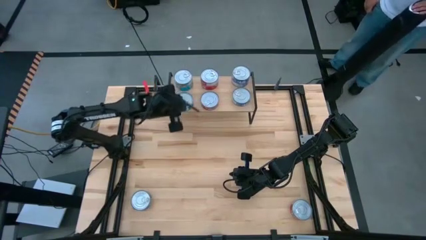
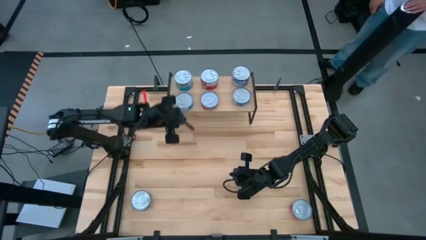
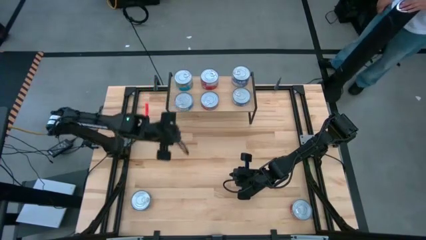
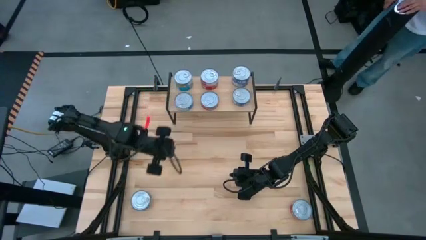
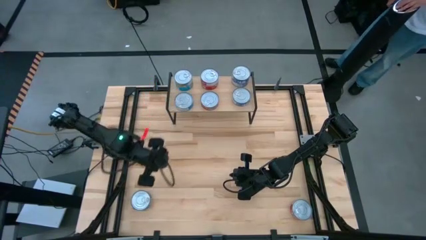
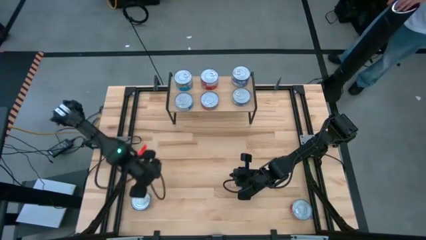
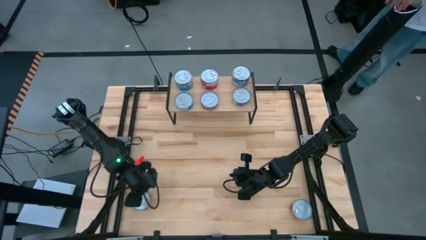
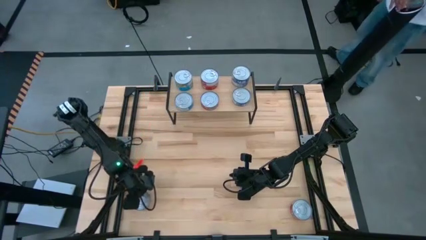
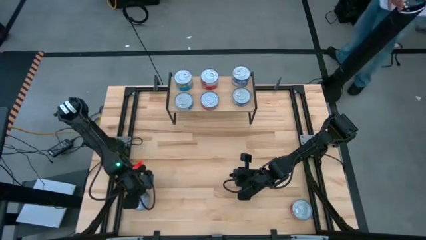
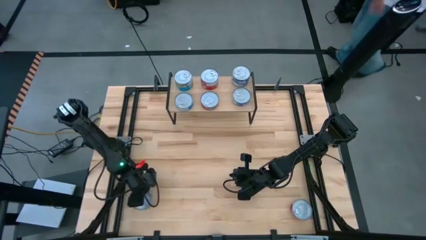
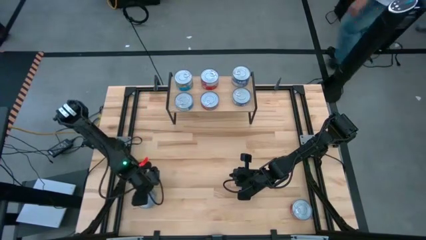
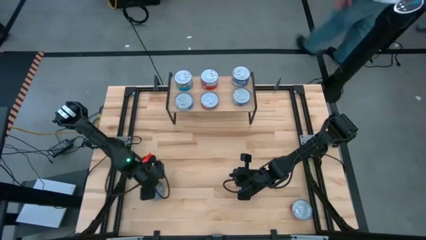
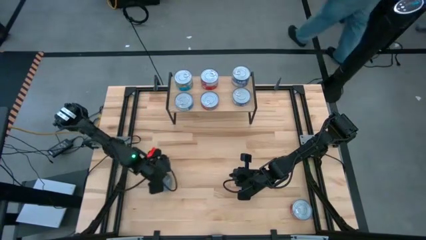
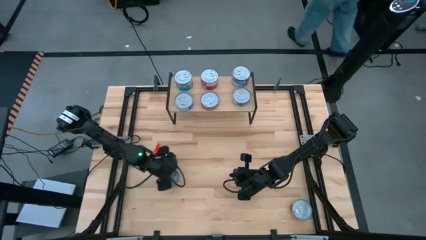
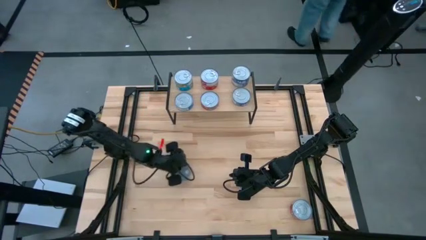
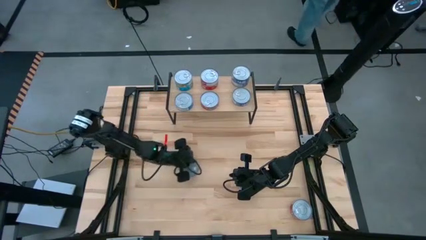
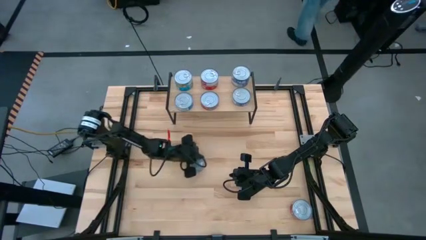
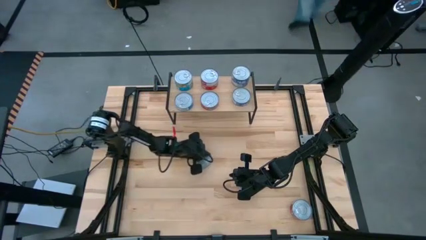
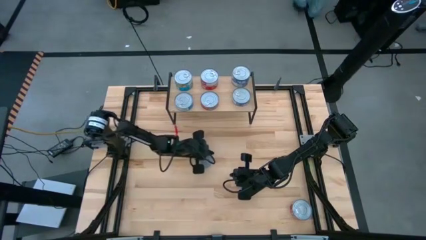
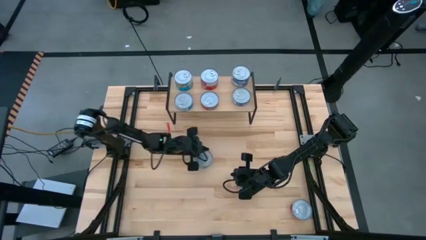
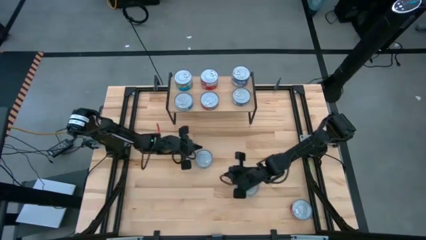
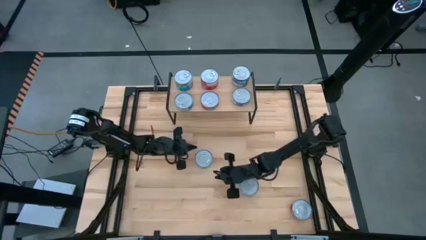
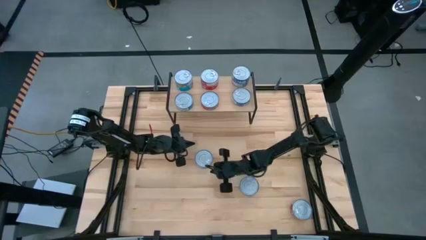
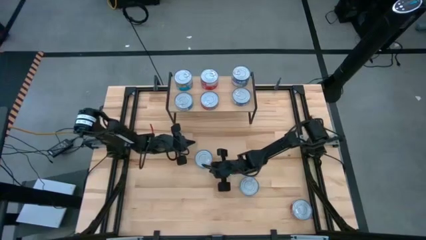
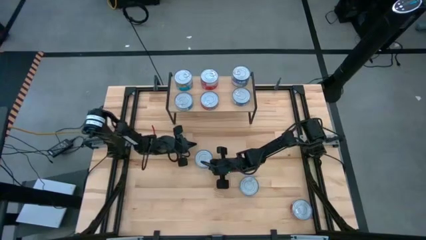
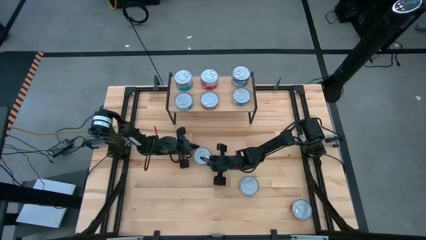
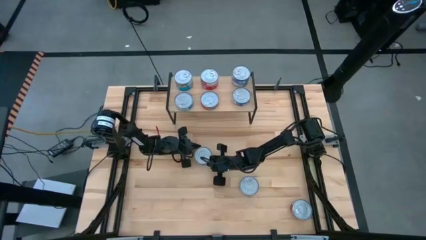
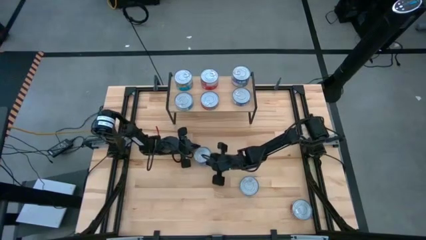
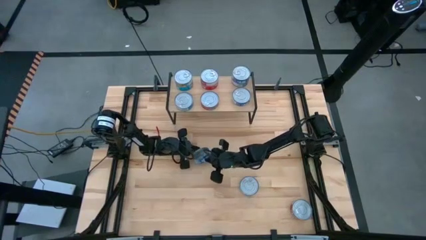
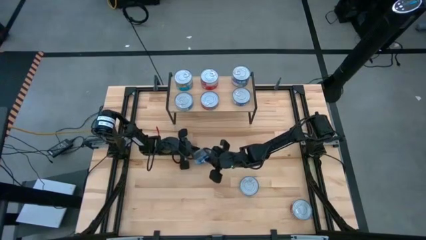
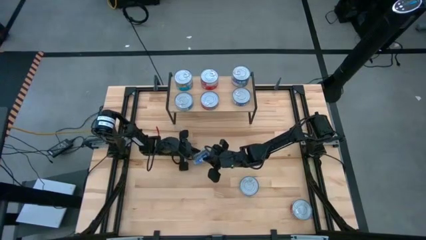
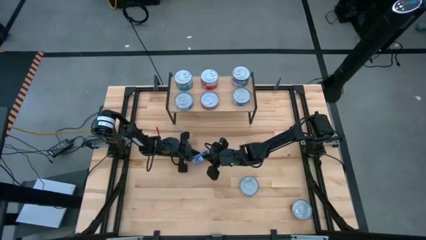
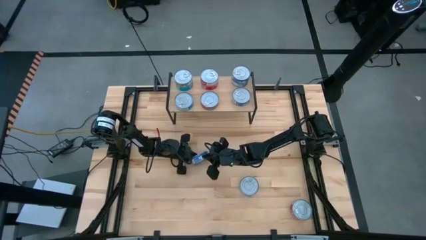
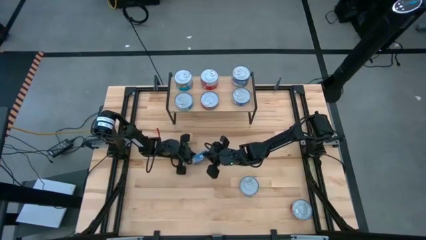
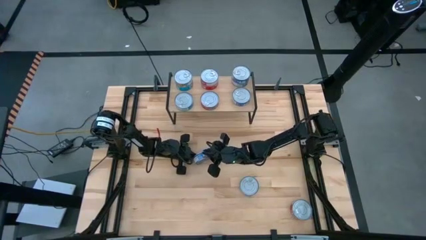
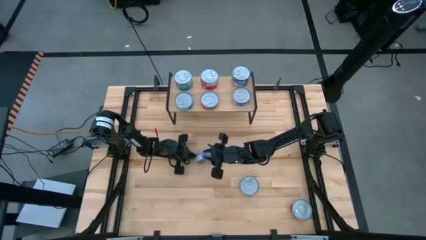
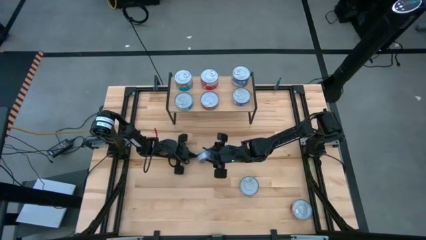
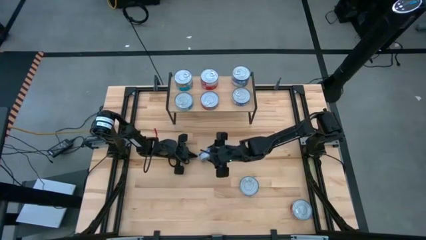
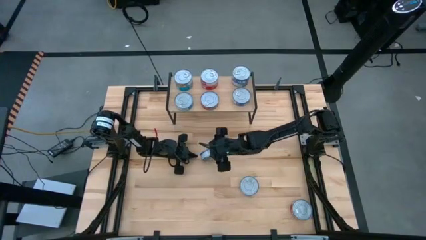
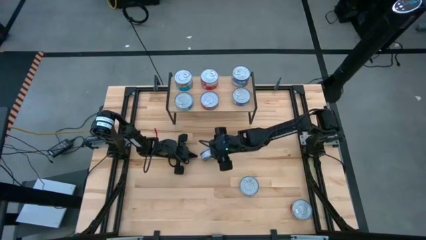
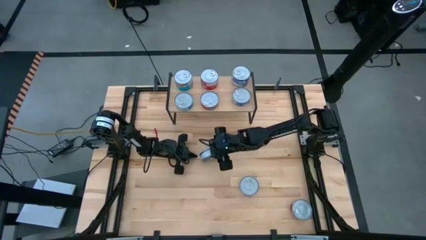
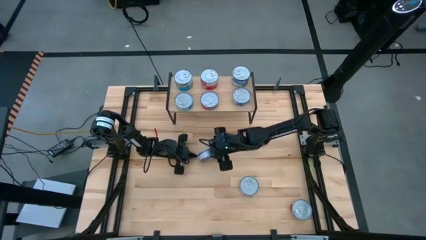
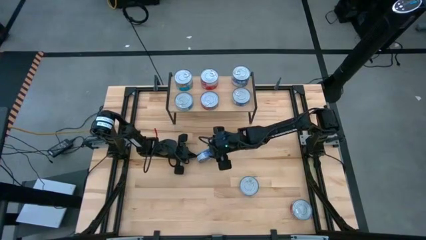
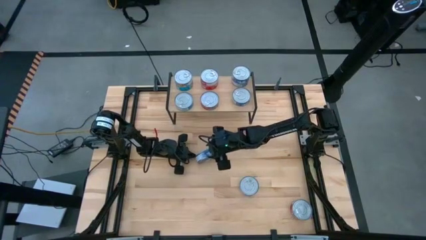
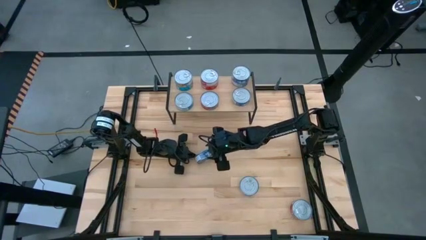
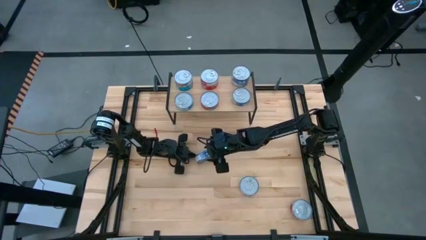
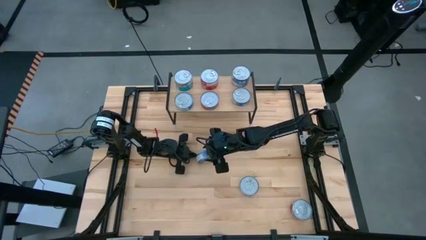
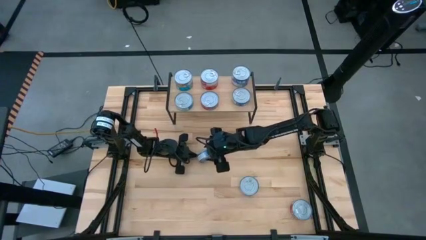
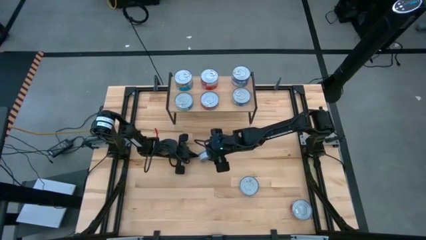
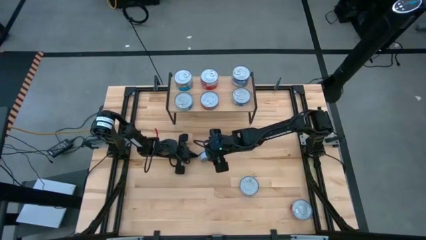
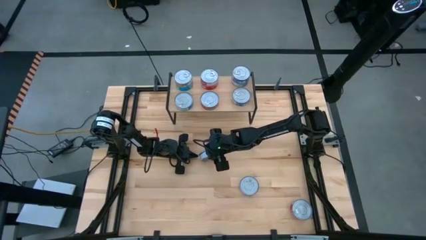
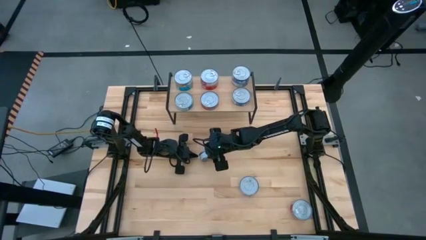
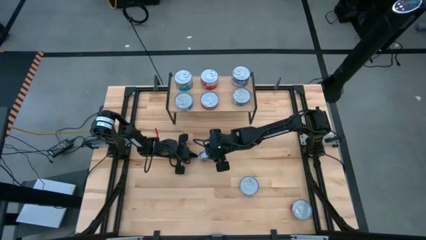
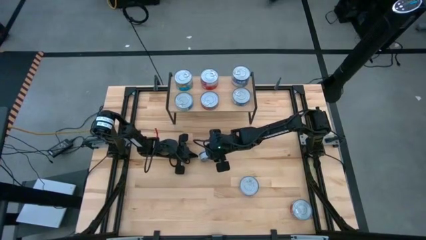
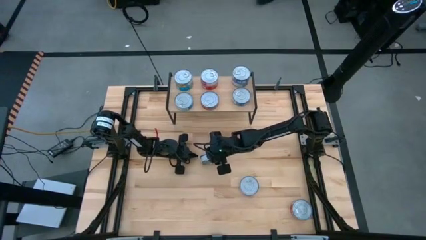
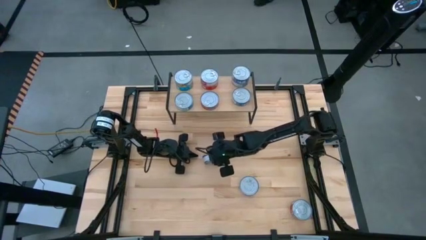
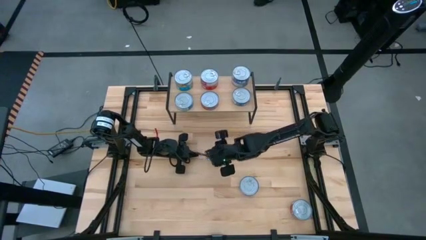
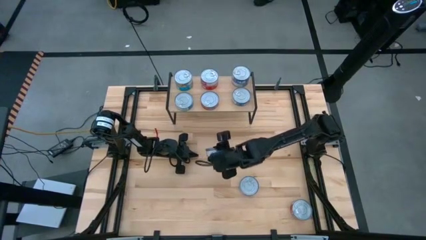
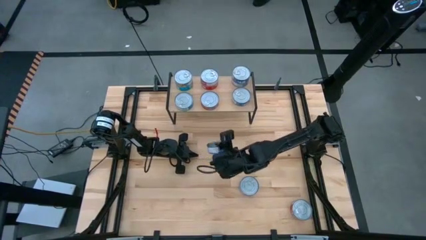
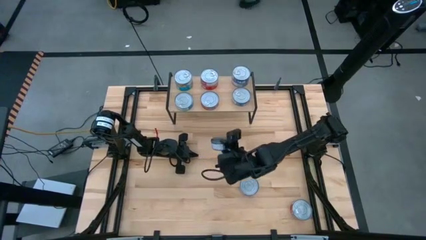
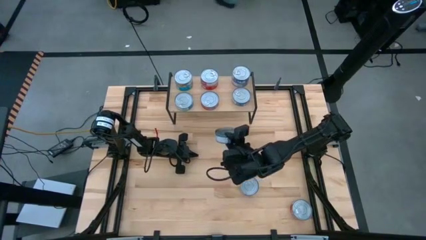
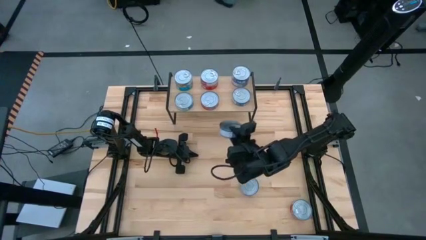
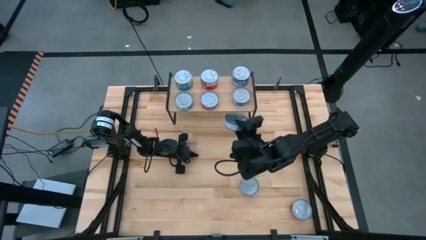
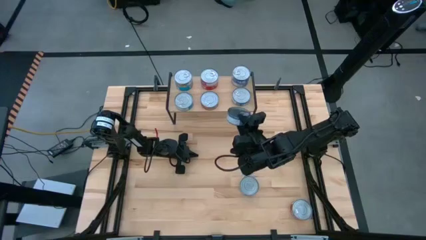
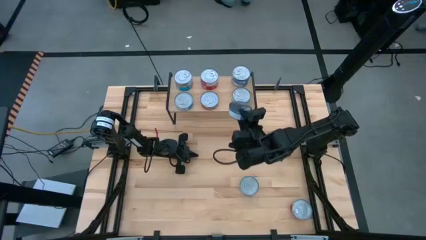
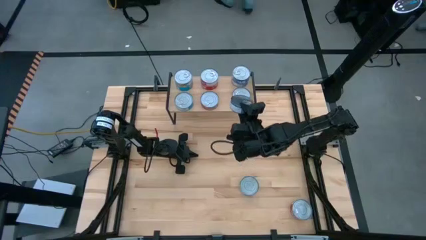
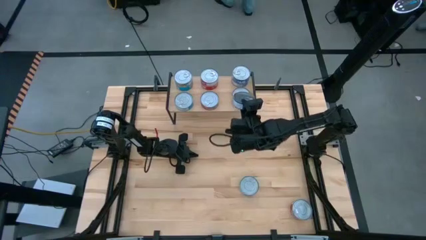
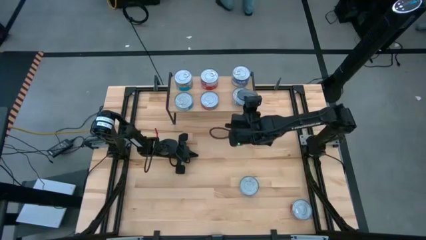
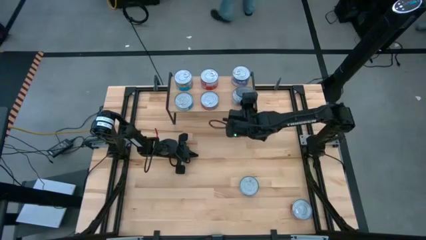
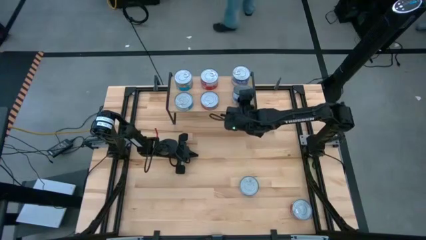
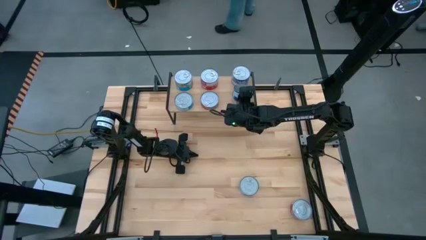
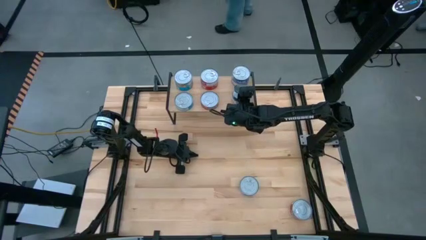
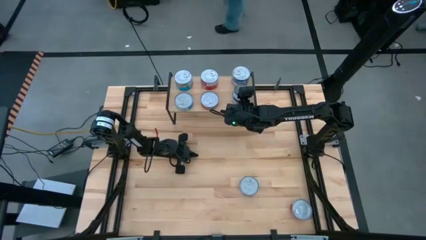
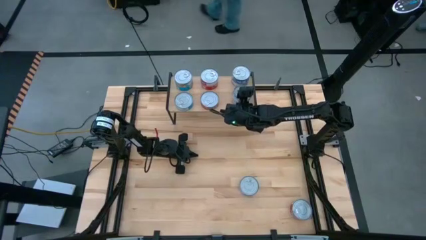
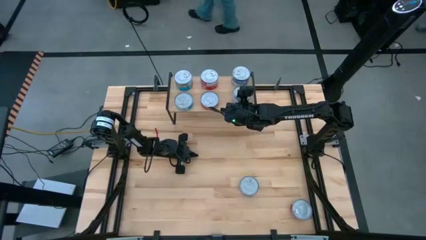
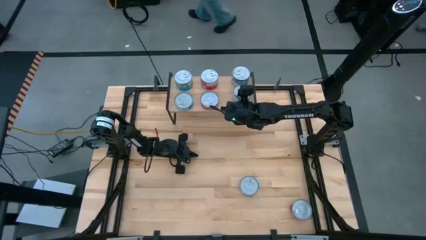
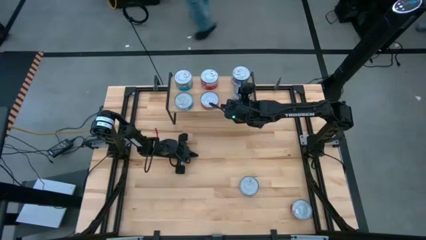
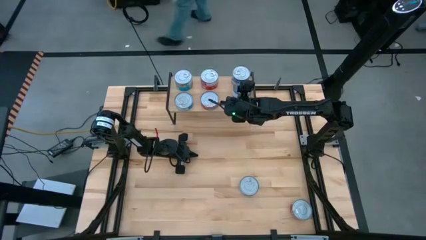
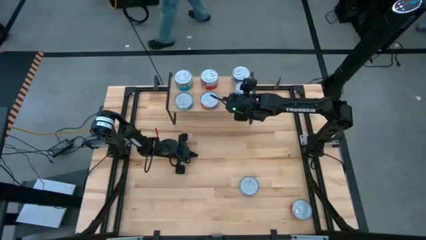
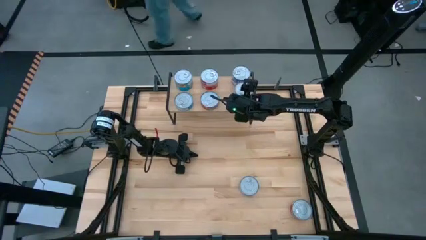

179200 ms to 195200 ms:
Task: Stack canned seafood by type on shelf
Stack the blue tuna can on top of the other blue tuna can on the shelf
